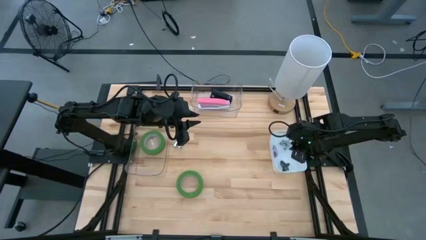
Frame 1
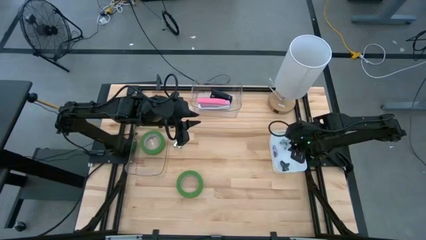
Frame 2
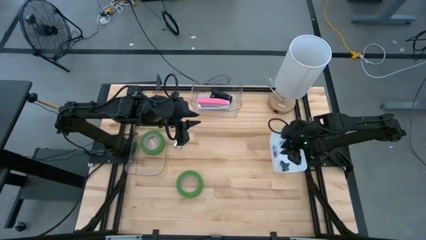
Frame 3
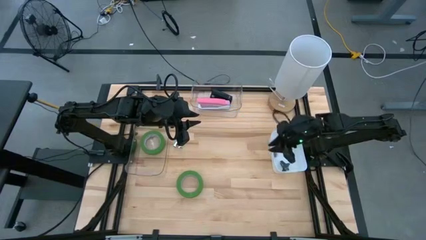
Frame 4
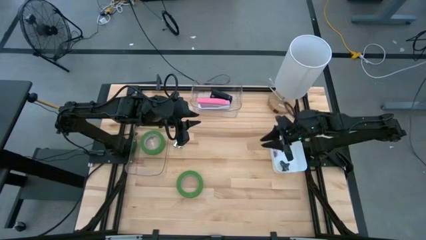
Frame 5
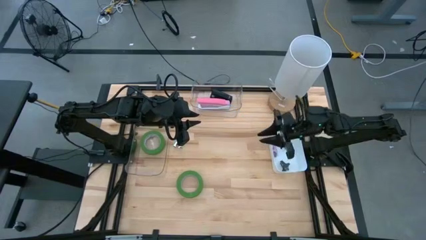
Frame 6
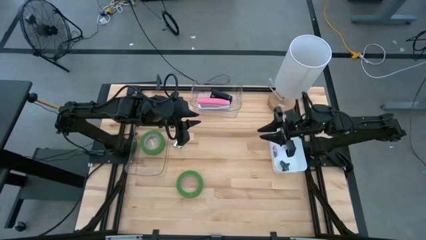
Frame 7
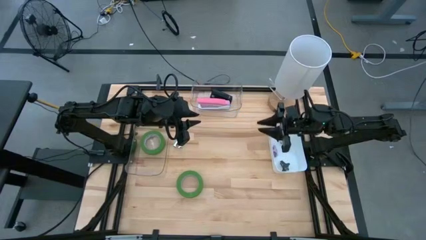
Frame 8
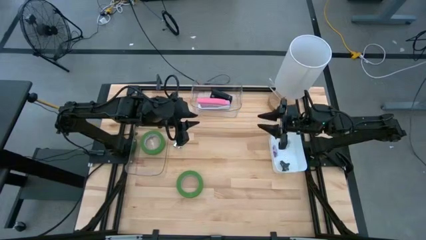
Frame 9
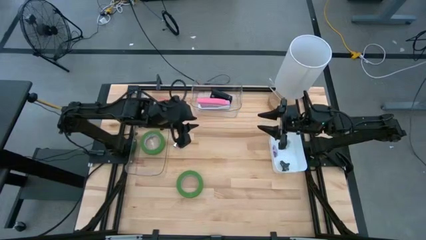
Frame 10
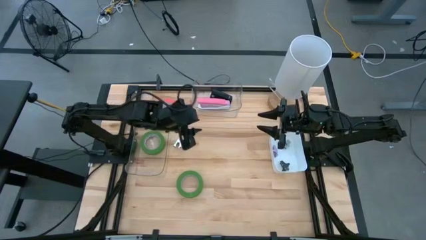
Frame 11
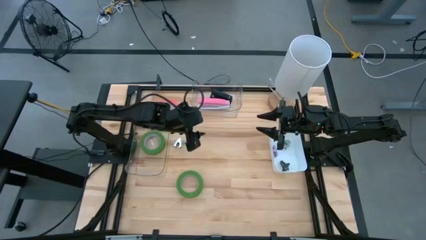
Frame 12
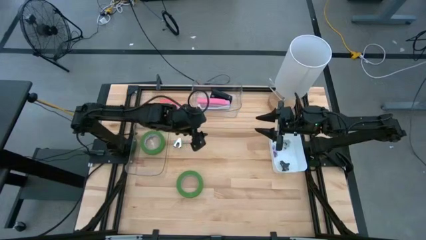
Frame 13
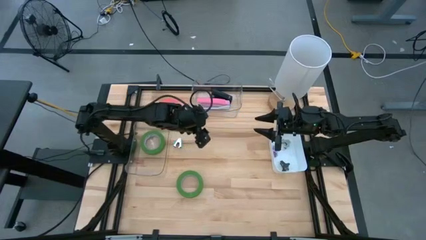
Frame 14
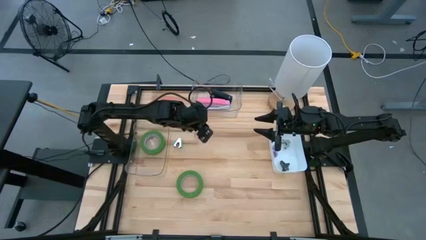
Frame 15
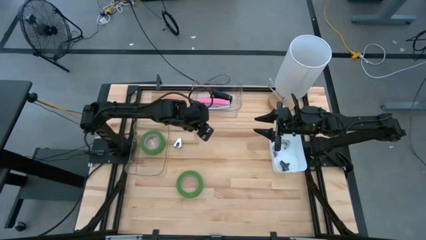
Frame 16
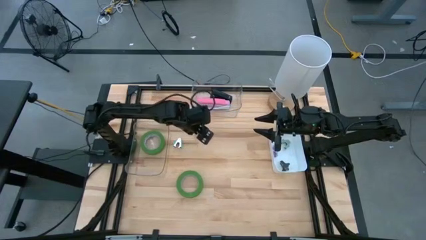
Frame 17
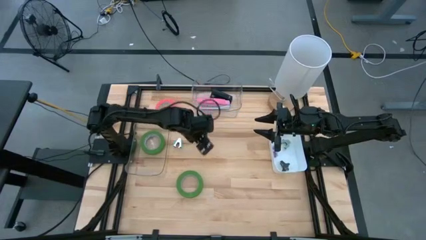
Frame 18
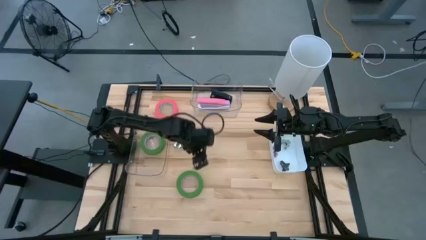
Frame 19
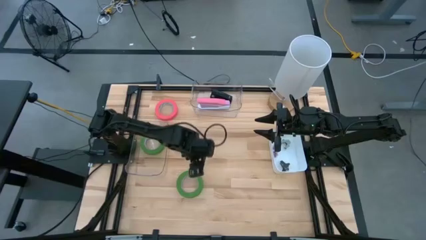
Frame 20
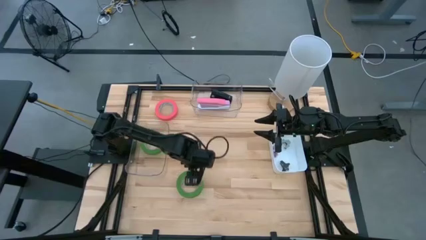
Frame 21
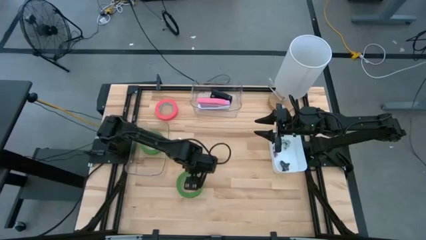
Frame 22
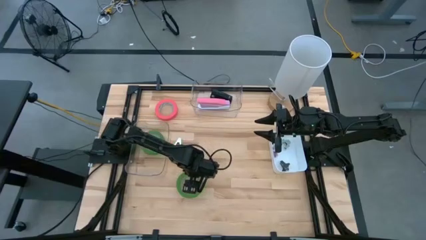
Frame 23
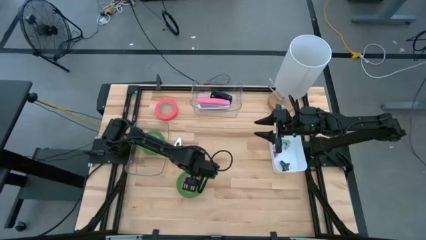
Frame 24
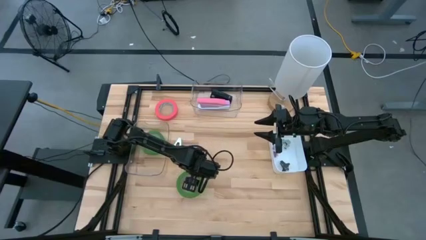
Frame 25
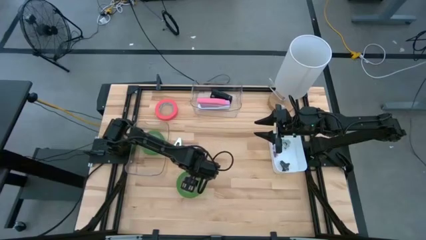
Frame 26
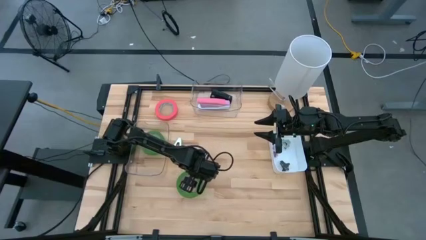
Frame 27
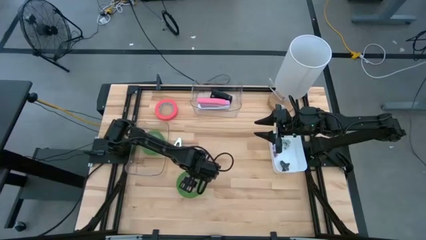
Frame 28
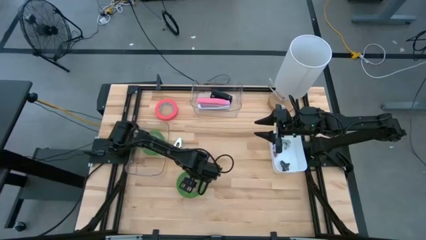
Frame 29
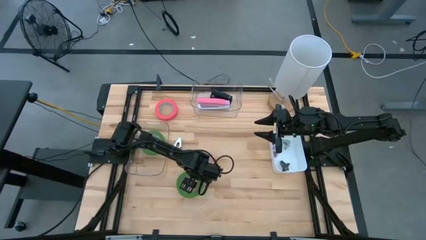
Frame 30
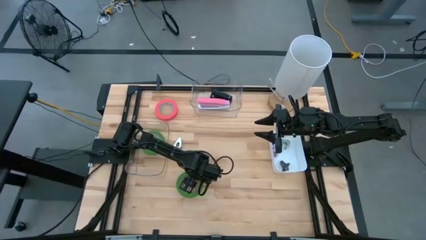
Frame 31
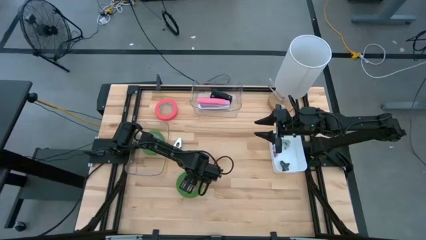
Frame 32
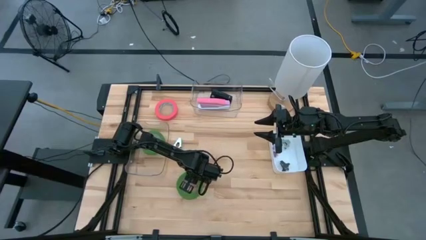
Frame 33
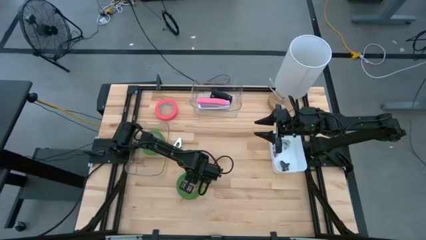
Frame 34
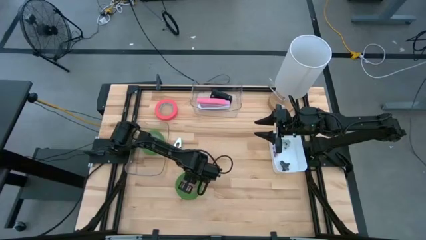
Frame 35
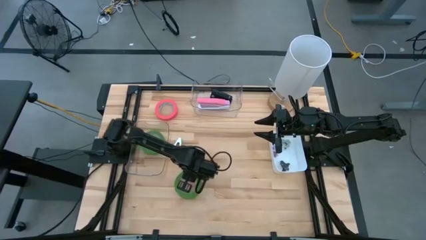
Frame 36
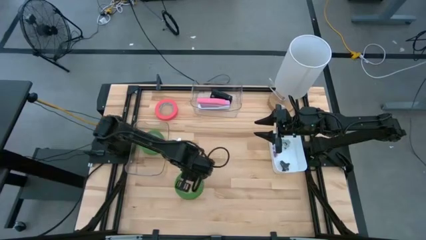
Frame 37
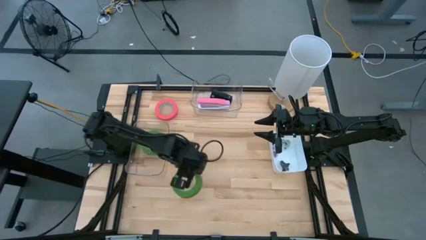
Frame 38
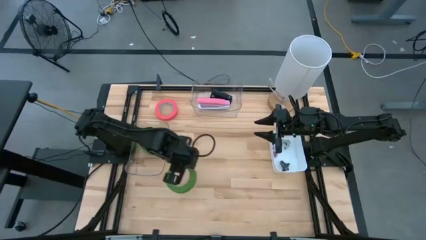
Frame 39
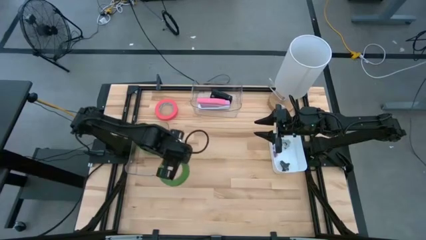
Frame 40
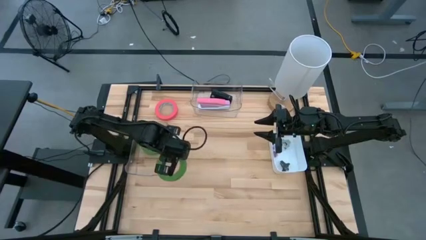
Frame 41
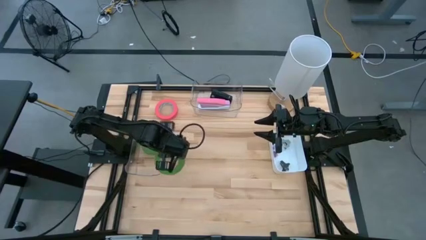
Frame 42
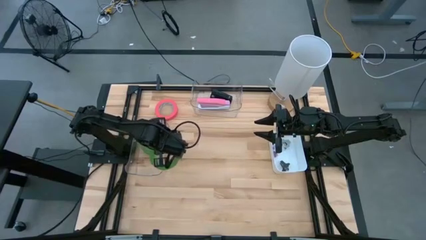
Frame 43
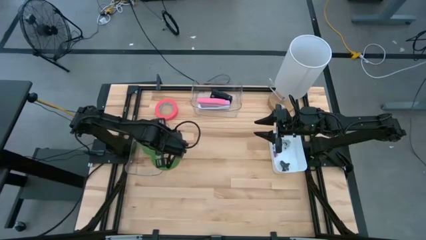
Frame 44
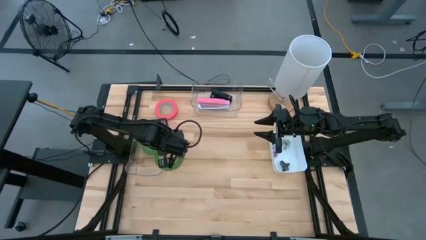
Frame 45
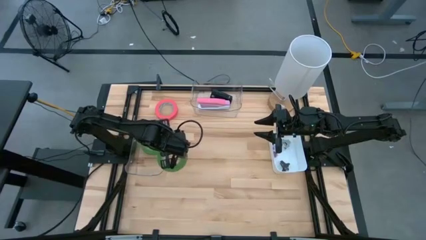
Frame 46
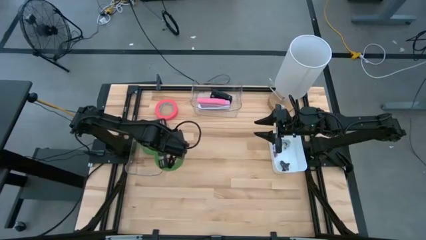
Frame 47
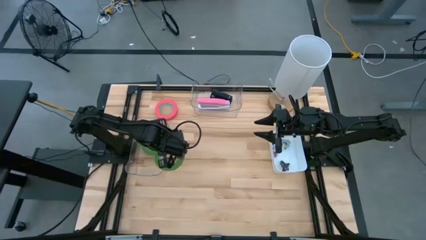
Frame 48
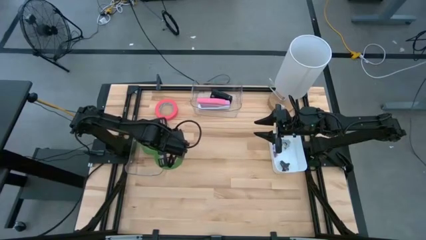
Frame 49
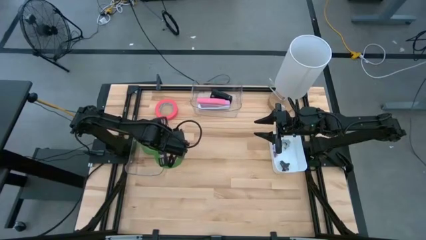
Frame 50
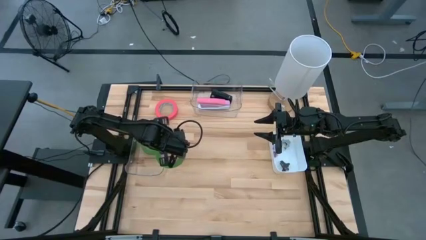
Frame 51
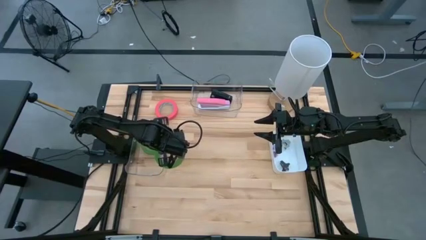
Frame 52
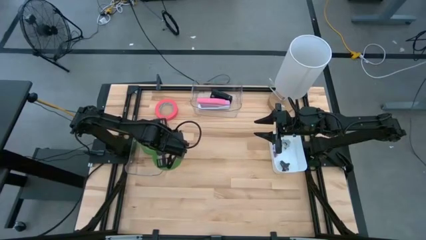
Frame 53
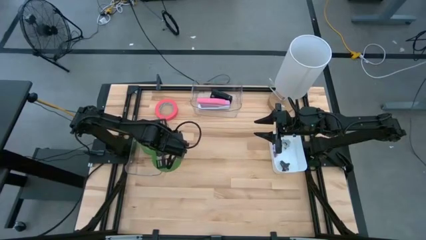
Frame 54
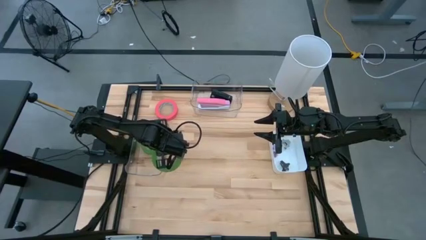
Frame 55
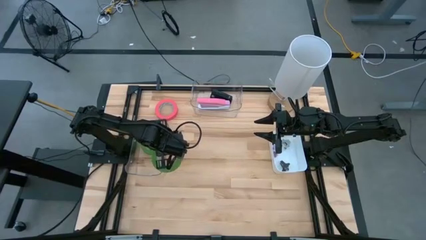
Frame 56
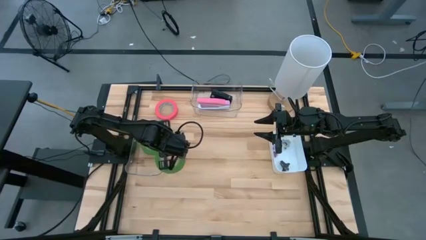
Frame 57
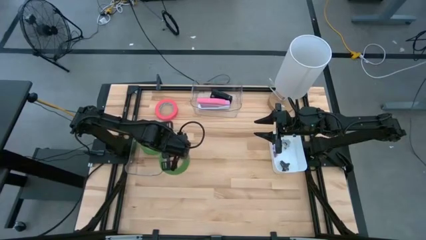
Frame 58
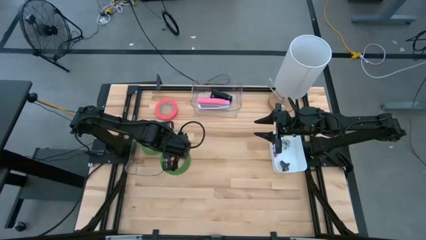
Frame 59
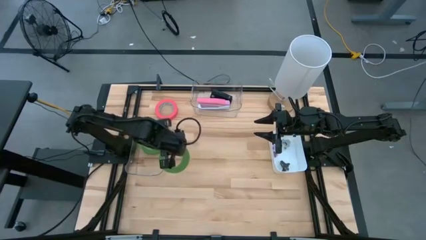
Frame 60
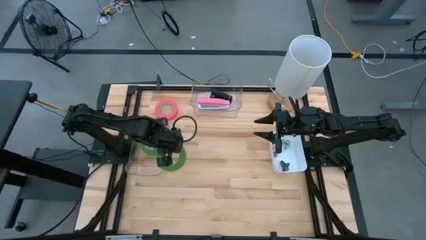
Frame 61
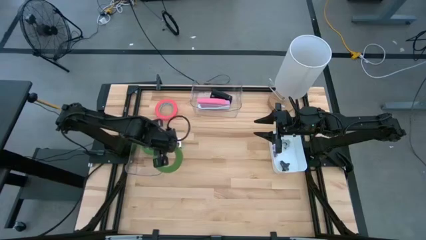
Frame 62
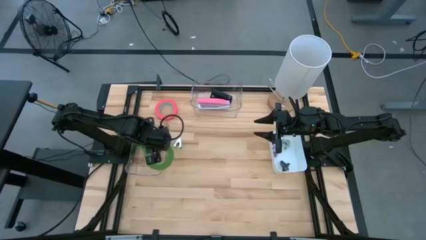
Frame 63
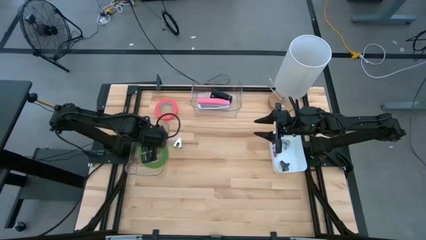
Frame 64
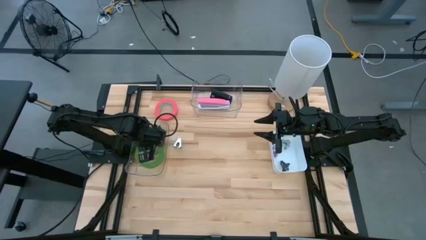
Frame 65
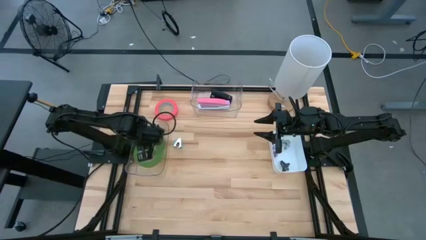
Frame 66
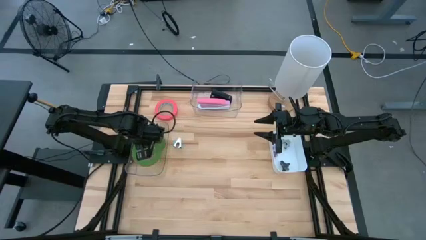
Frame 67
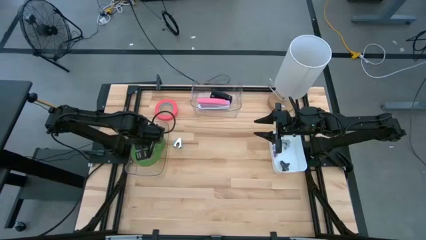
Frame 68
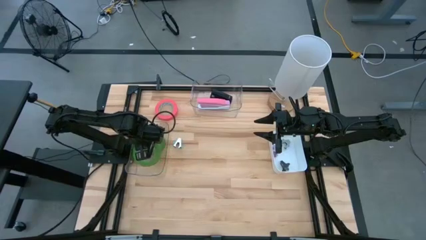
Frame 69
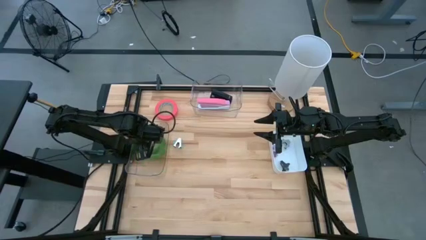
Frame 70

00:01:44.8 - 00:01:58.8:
Task: Pick and place Stapler, Stapler remover, tape
Put the green tape into the bottom transparent bin

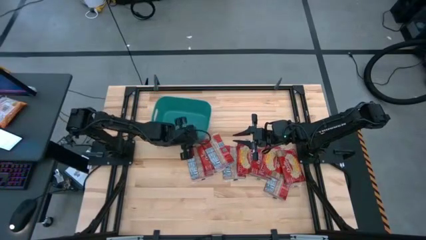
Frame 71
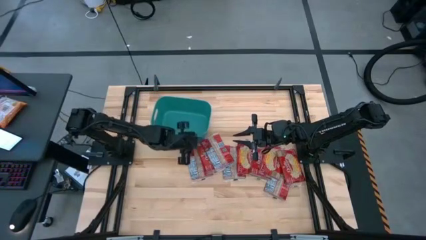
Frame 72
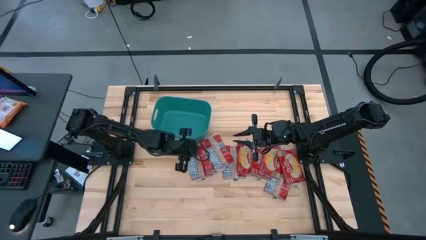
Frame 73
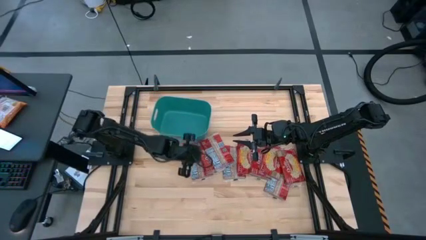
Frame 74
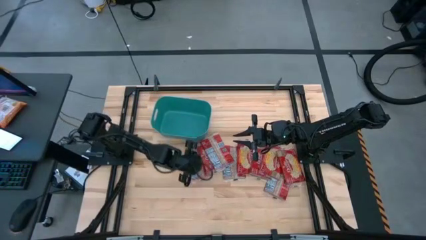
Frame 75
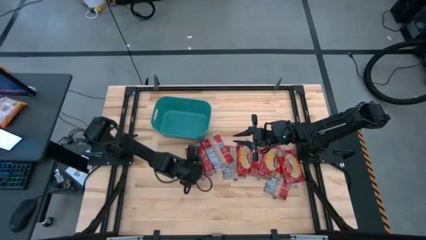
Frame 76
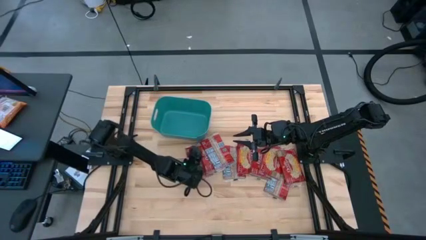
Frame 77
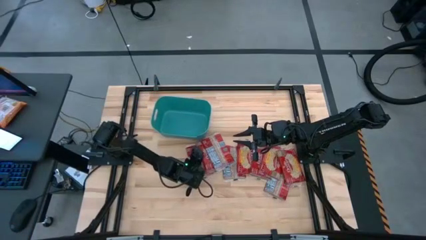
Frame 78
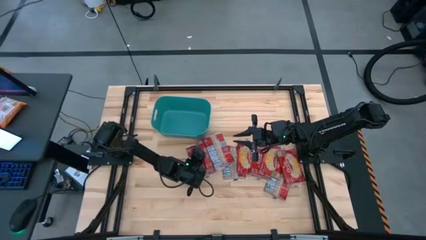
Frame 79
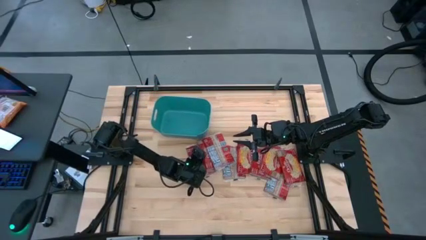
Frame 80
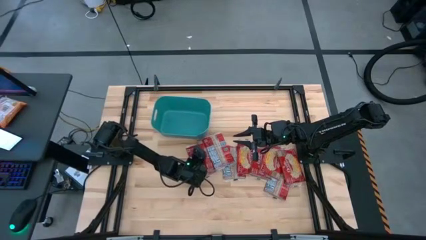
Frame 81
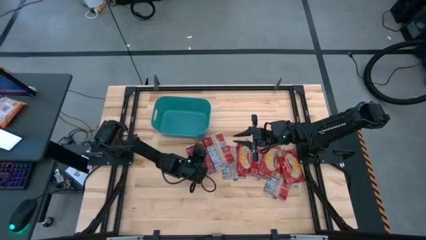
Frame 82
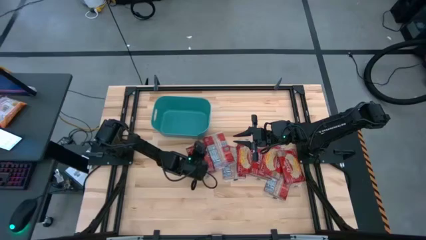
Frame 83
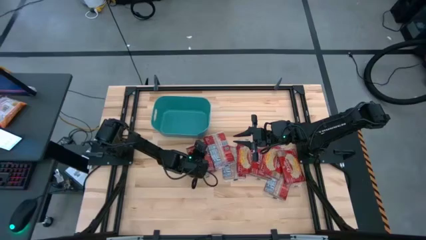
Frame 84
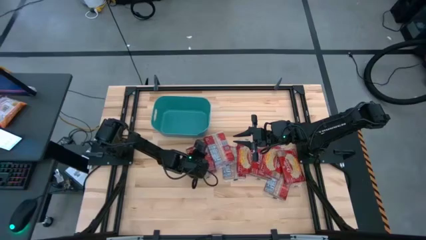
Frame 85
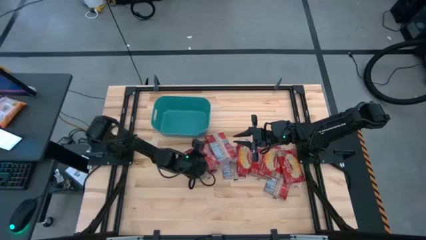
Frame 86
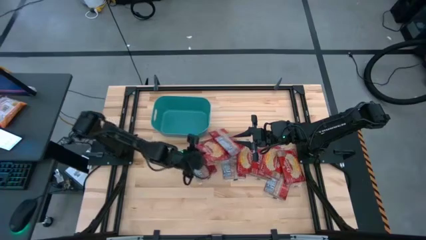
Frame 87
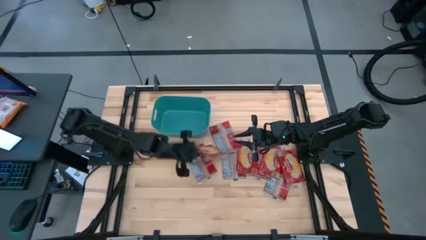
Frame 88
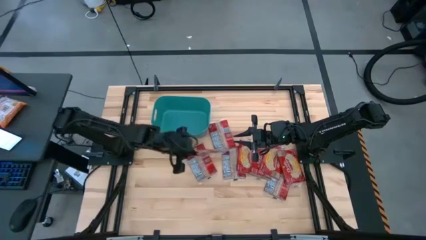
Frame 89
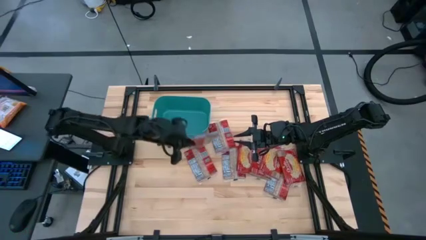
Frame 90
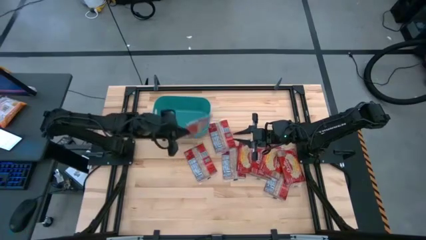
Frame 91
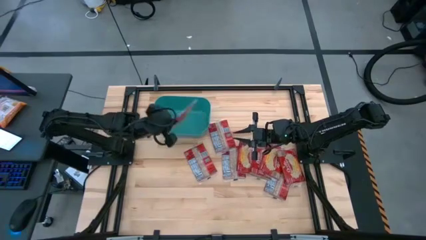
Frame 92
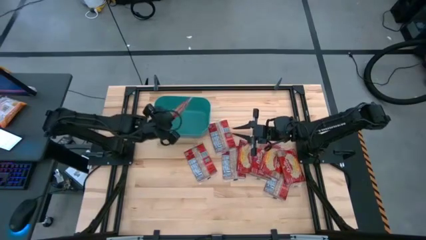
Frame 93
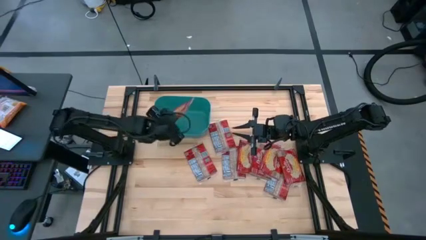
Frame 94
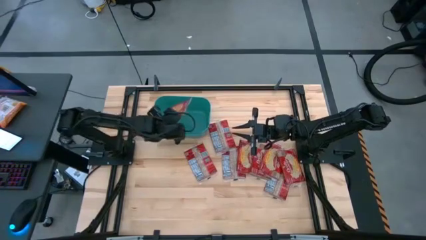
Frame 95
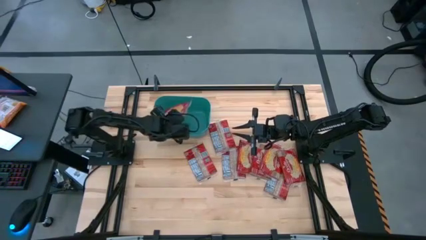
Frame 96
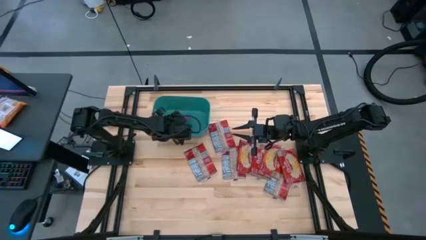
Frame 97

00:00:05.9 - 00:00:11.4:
Task: Sort popcorn bags into baskets
Put the red popcorn pack into the green bin
